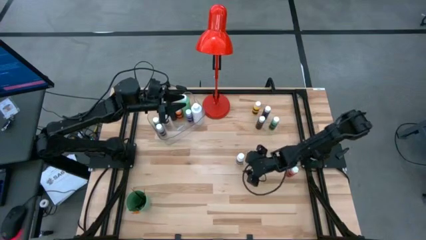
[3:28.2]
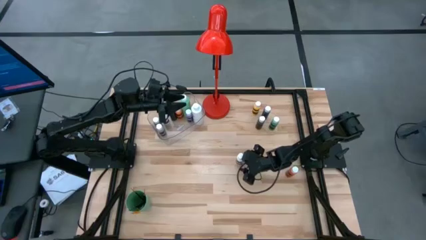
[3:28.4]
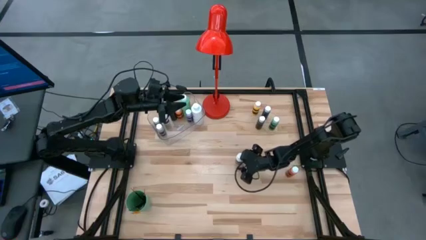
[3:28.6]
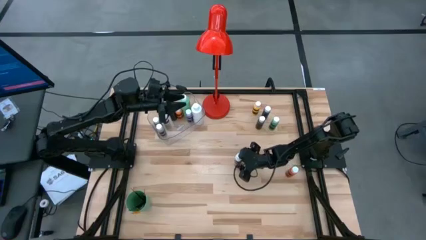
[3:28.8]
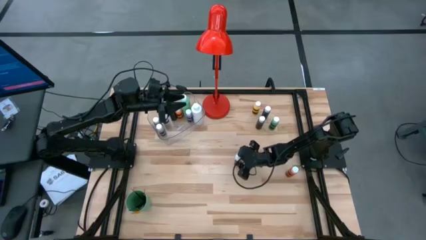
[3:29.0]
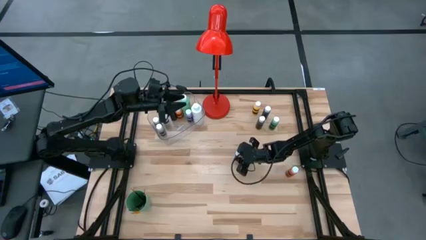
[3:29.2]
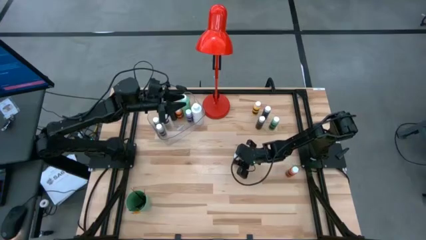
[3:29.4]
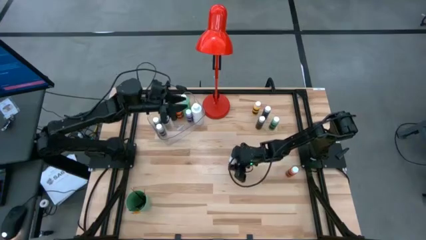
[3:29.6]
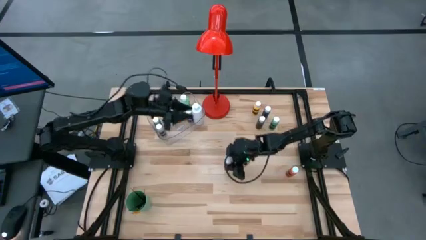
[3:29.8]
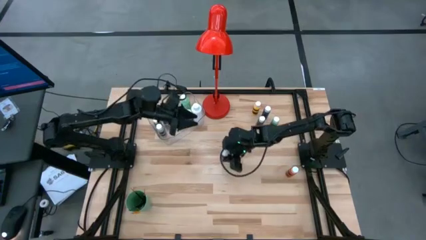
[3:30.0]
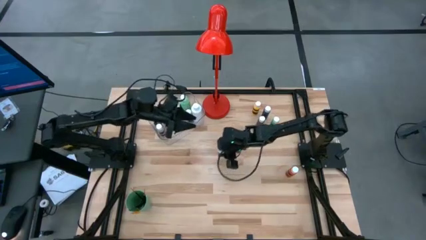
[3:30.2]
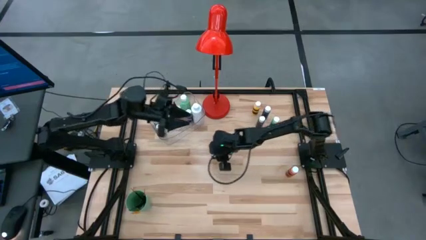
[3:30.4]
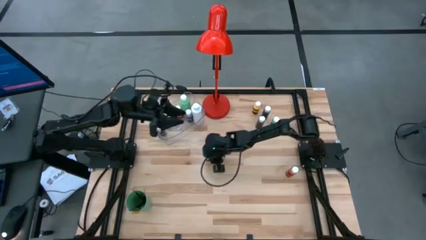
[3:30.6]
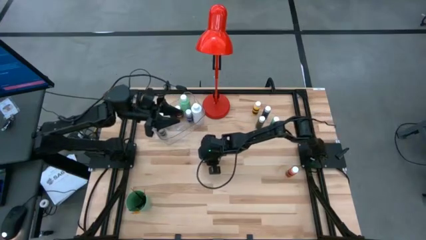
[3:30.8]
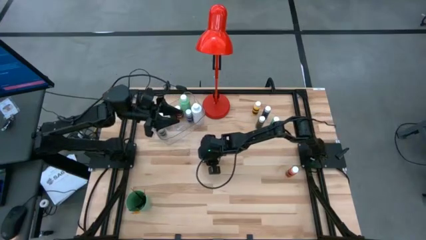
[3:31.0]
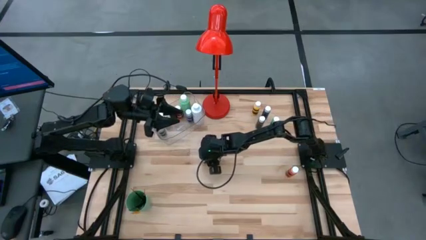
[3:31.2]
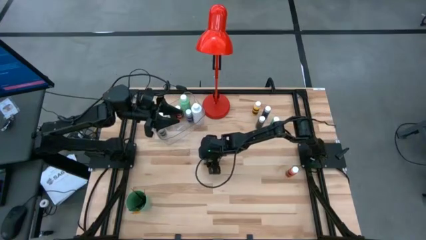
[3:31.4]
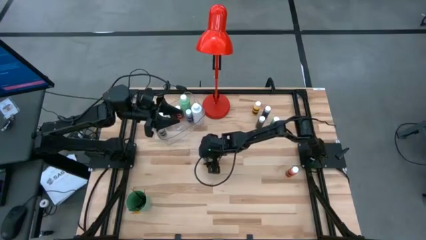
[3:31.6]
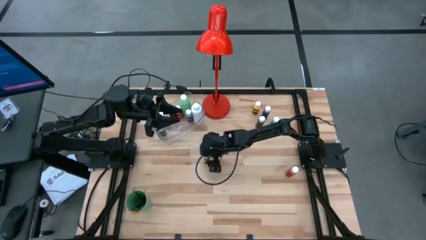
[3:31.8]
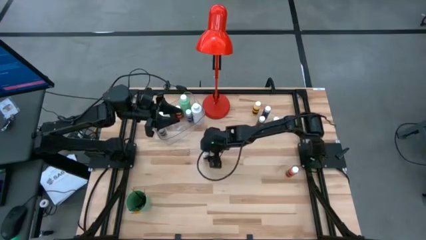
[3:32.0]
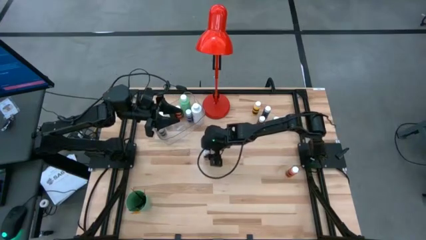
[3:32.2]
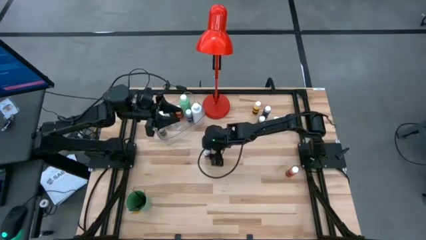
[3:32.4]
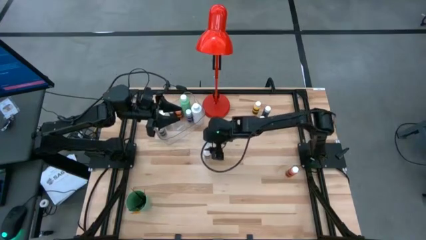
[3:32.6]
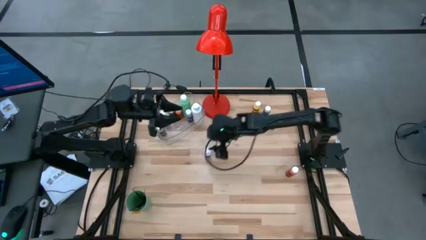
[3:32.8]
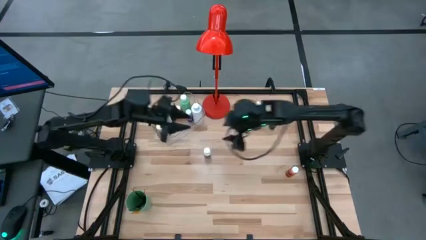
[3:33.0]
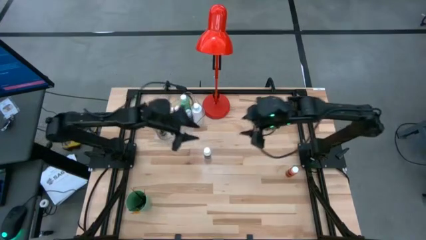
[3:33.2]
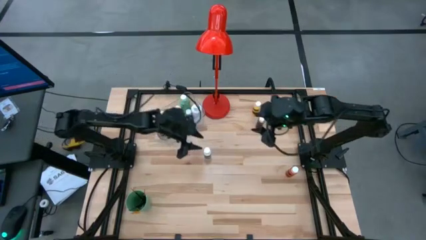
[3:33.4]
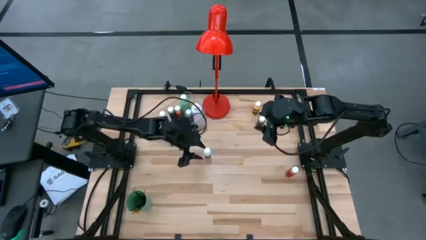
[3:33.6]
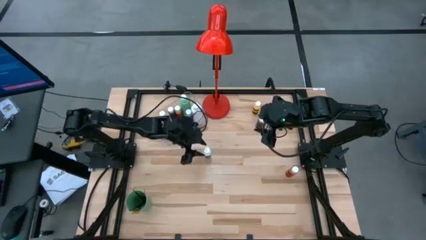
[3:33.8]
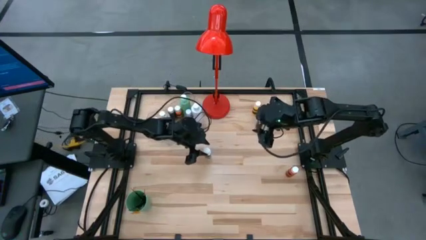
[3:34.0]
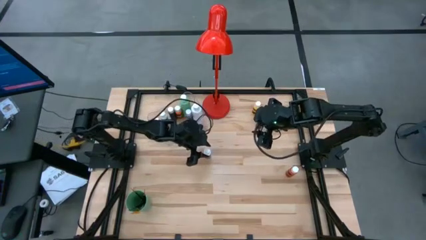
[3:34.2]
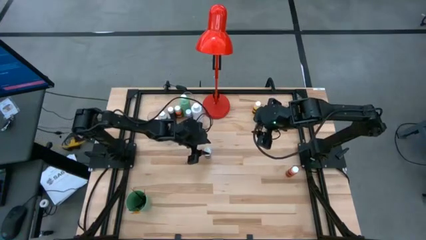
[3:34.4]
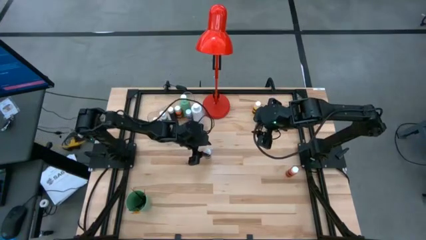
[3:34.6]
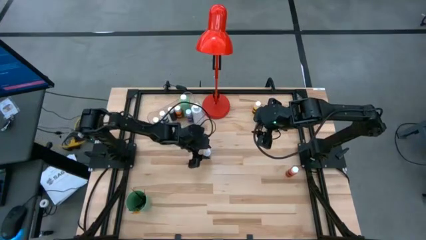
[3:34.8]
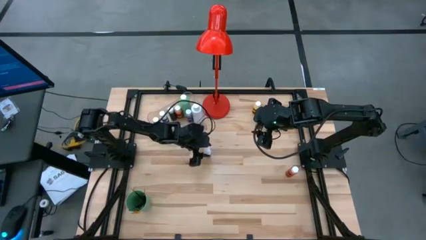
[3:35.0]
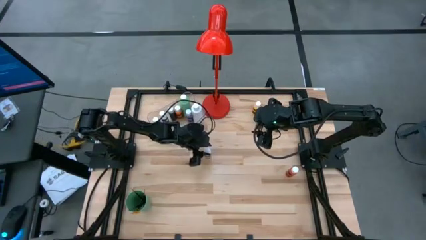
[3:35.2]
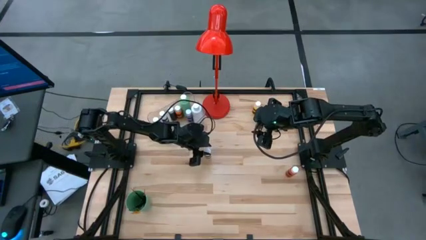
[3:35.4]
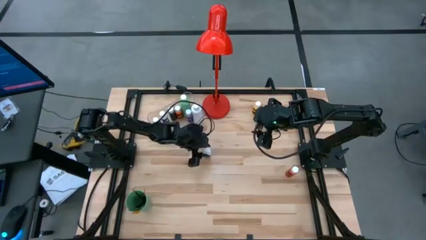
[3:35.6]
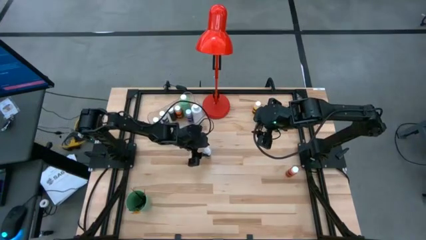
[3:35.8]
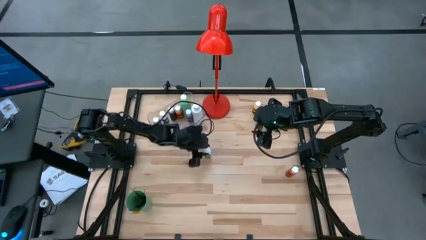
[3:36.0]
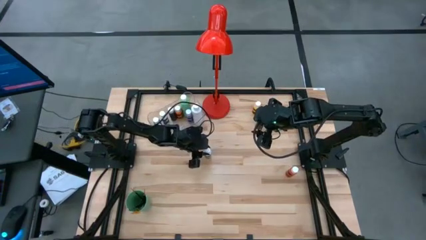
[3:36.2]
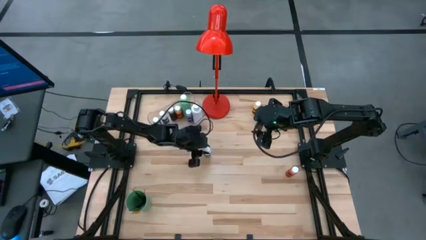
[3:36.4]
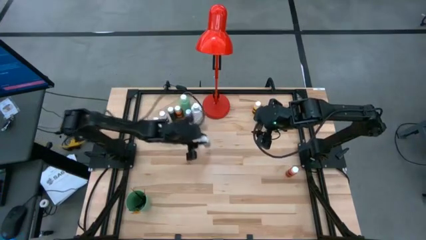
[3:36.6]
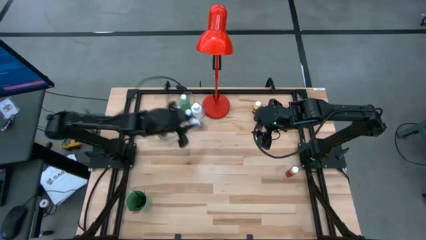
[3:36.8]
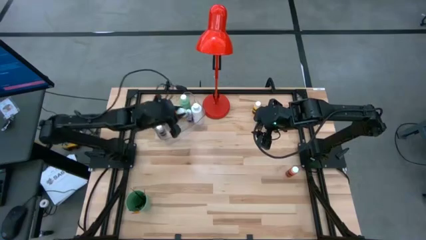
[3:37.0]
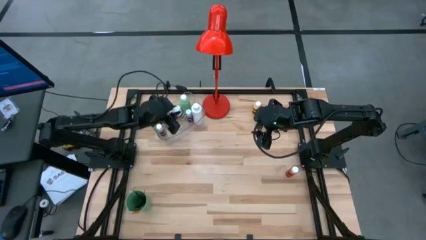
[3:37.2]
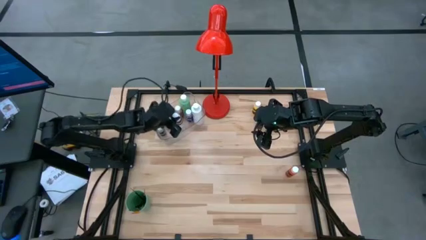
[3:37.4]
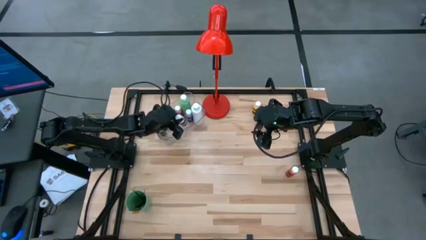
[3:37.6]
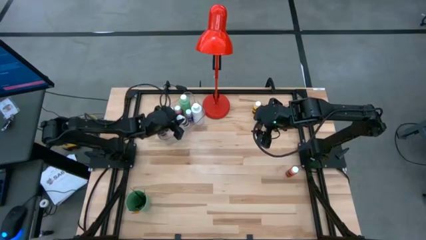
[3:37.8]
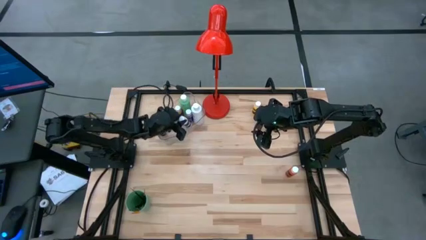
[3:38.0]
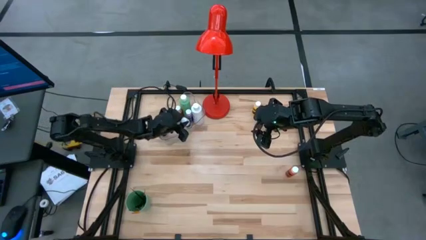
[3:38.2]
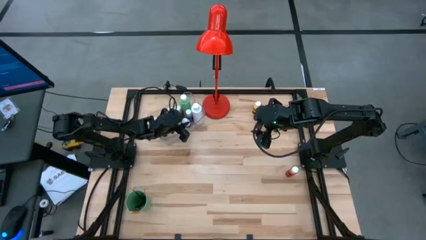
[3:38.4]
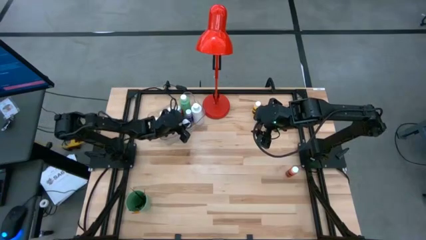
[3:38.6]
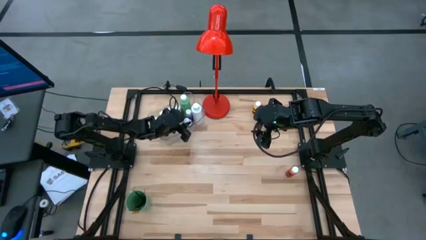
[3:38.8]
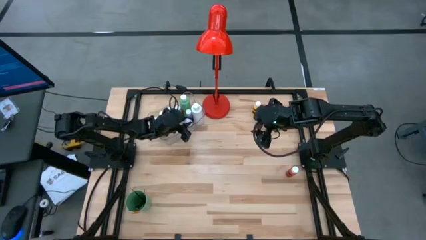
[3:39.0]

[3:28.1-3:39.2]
Task: Pick & Place Paint Supplies
Put the white paint bottle into the transparent bin
